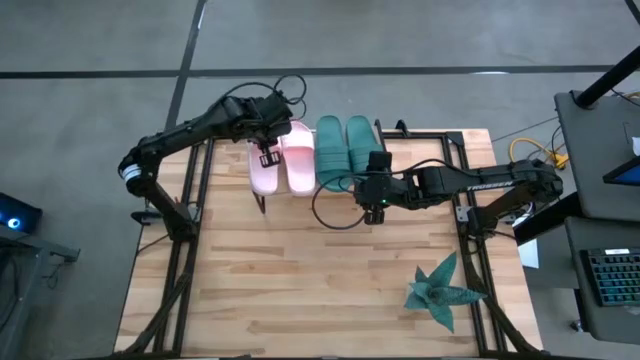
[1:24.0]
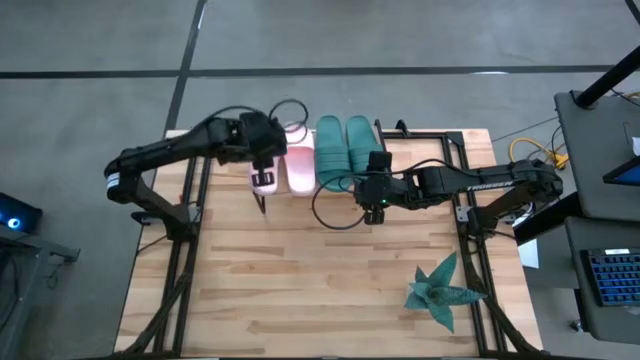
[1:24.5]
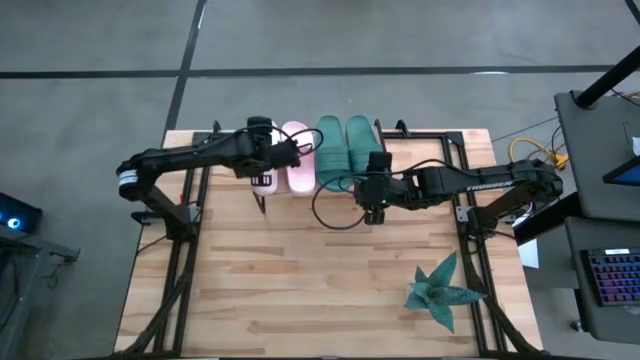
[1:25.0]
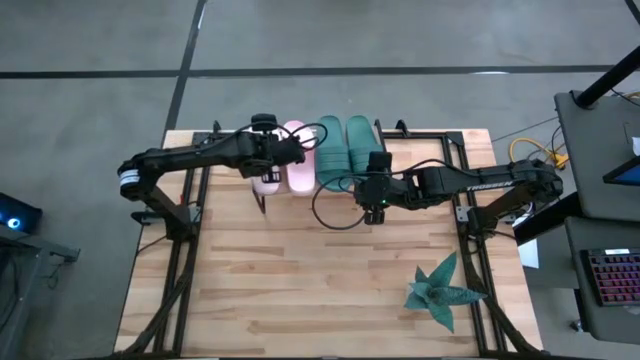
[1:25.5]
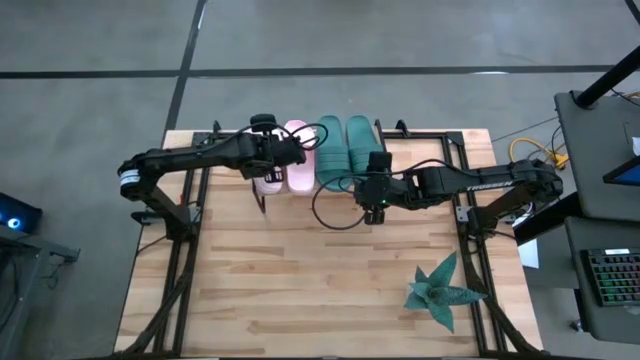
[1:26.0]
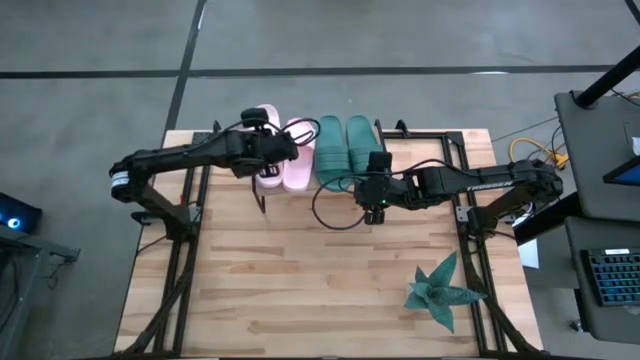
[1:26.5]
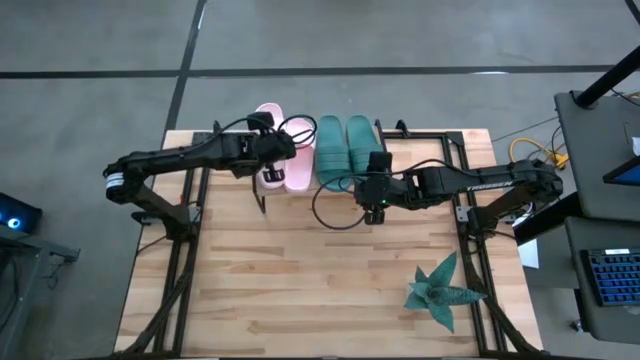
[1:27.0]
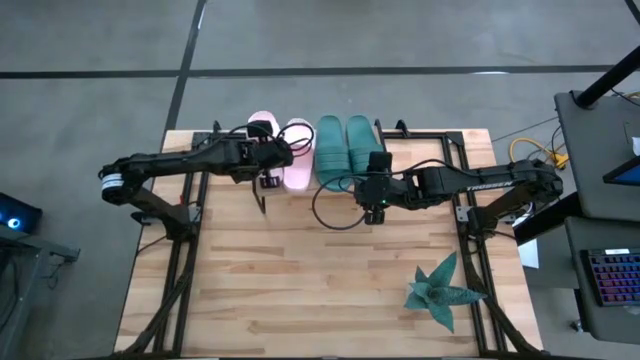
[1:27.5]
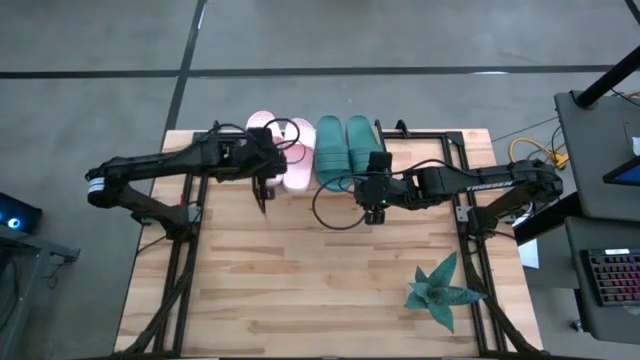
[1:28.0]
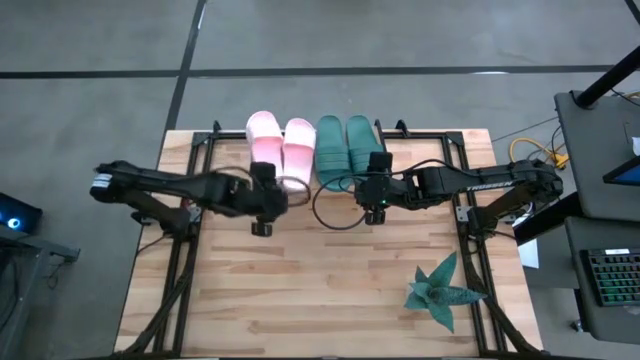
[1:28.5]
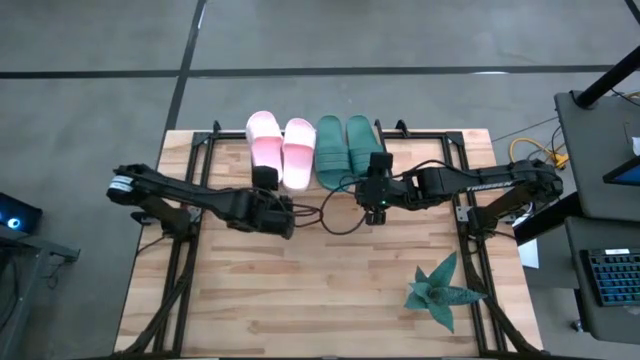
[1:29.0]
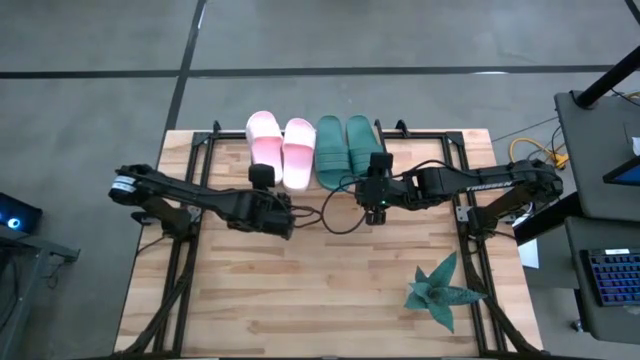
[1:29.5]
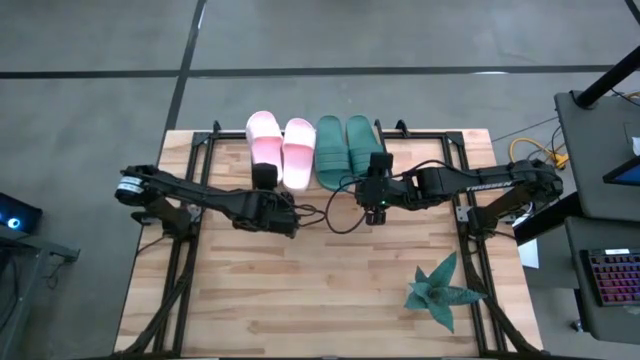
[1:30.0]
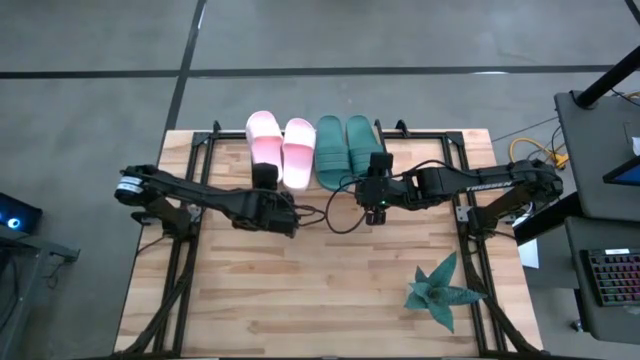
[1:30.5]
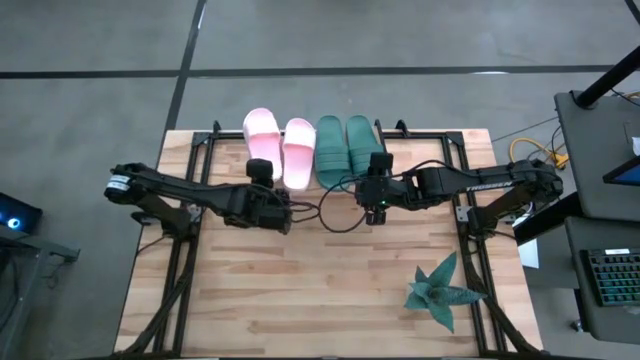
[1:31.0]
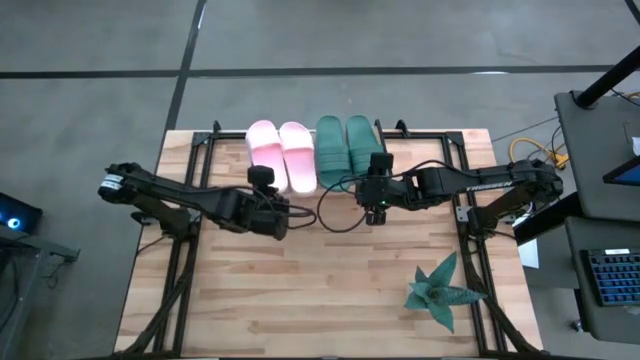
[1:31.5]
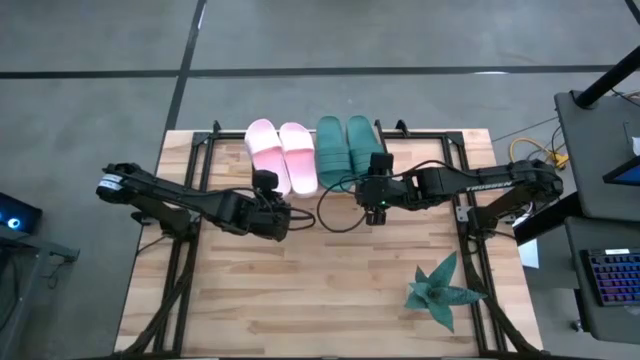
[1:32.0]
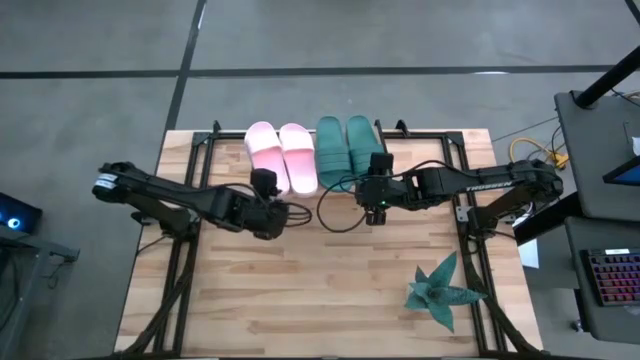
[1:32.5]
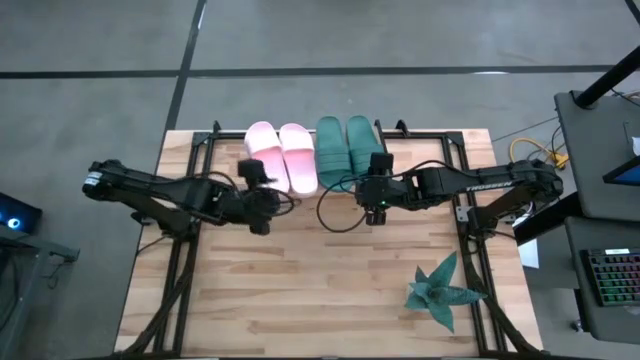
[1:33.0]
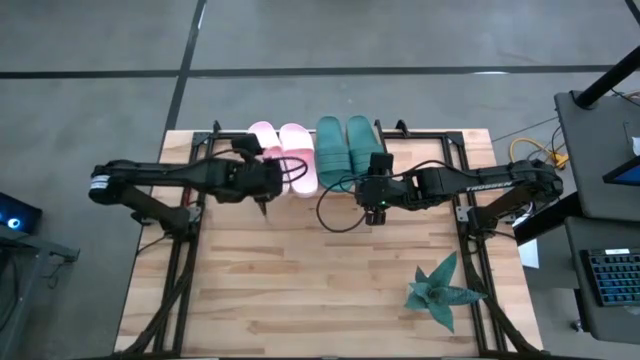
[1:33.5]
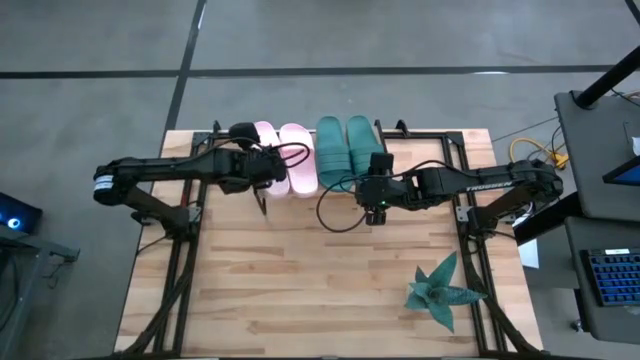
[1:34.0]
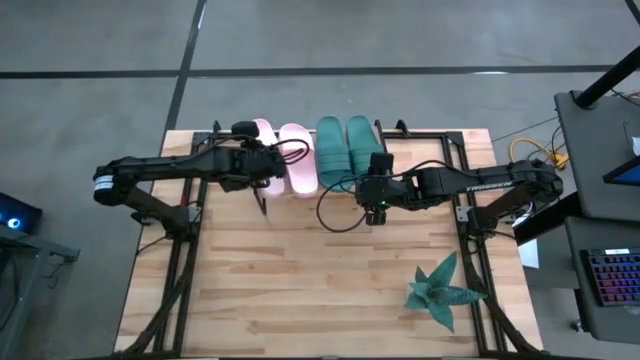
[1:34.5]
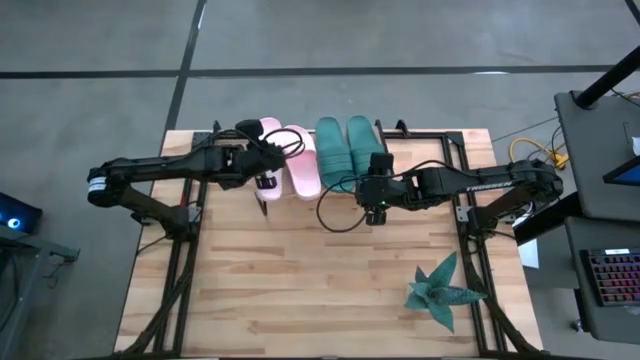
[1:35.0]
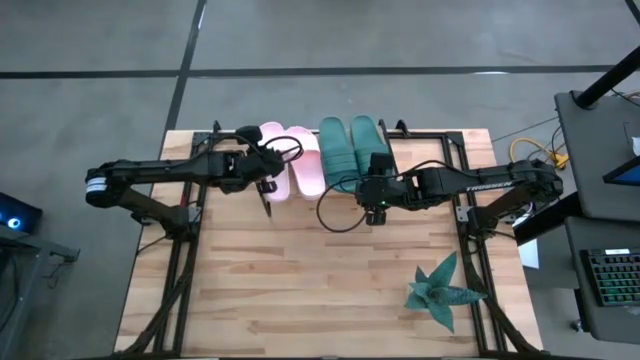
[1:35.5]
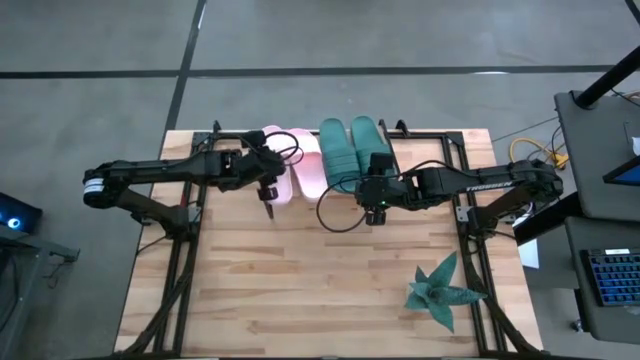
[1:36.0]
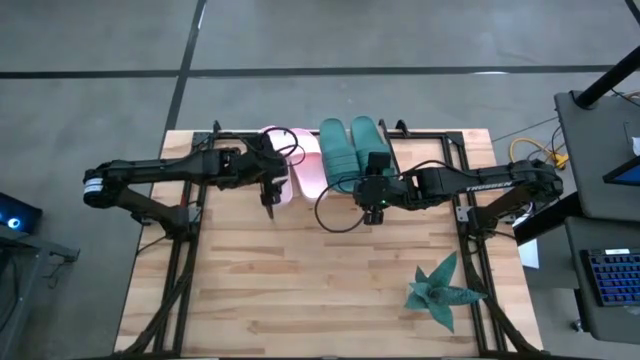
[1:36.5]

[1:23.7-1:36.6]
Task: Pick and place slides into the shelf
Put the pink slipper on the shelf

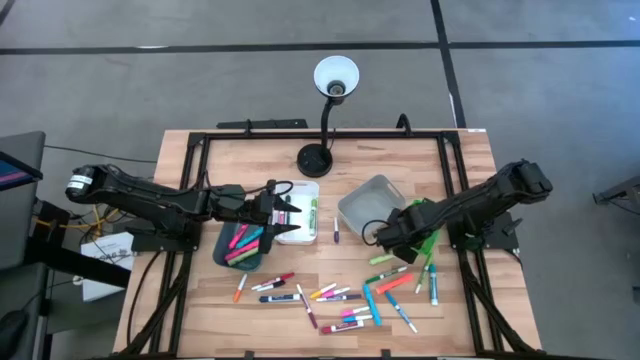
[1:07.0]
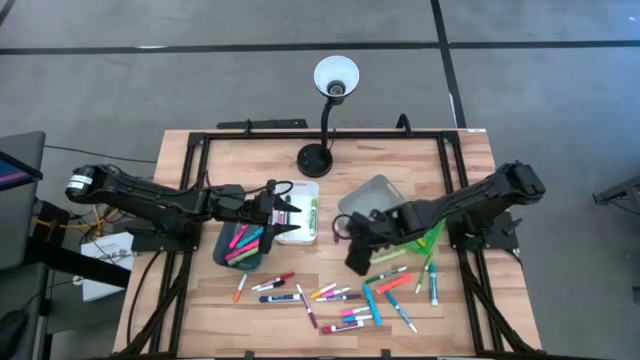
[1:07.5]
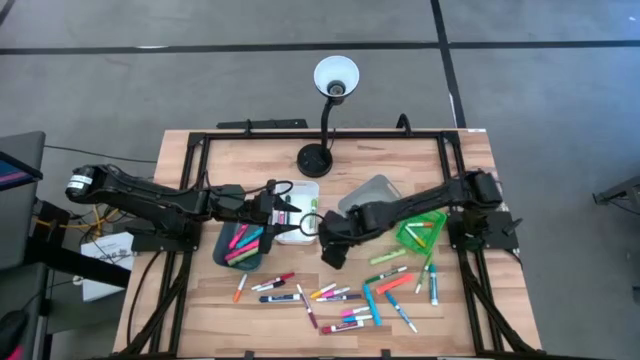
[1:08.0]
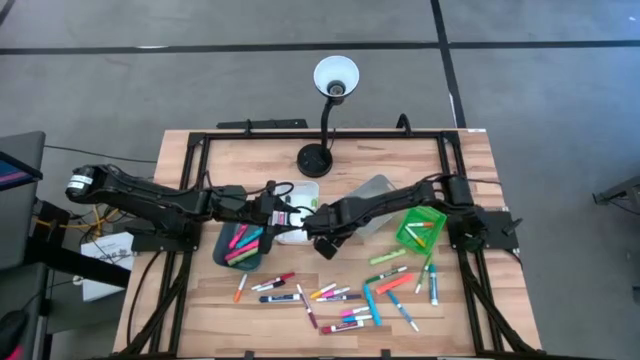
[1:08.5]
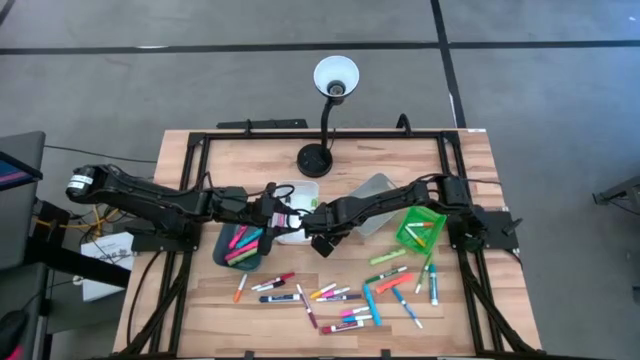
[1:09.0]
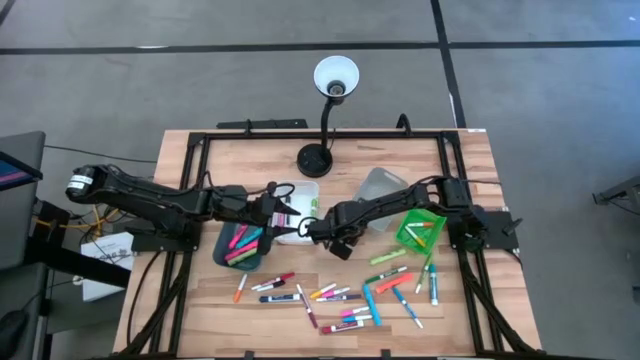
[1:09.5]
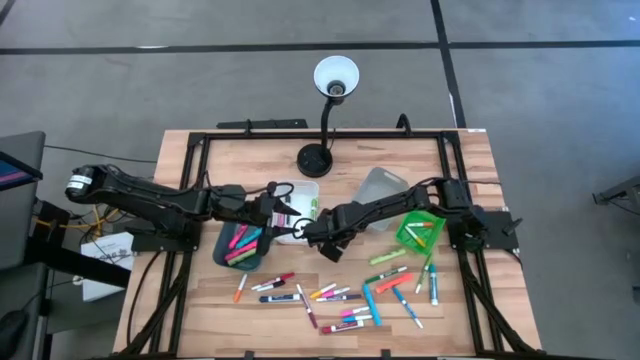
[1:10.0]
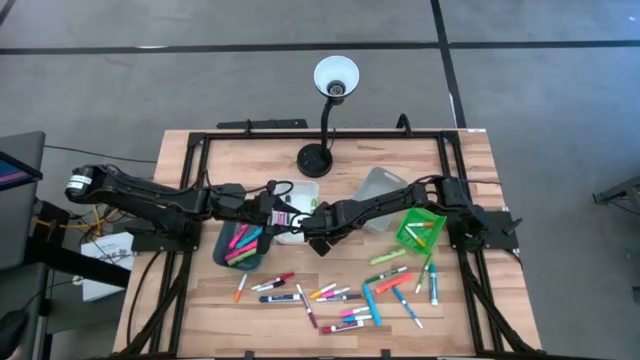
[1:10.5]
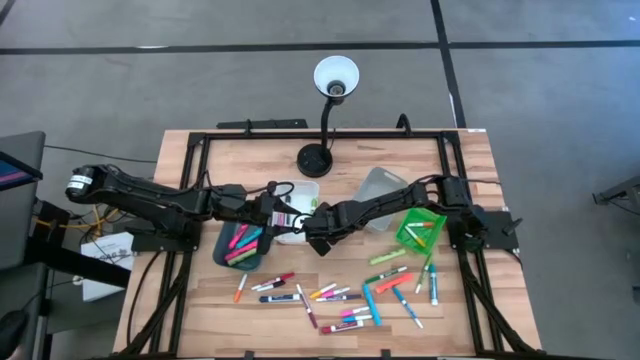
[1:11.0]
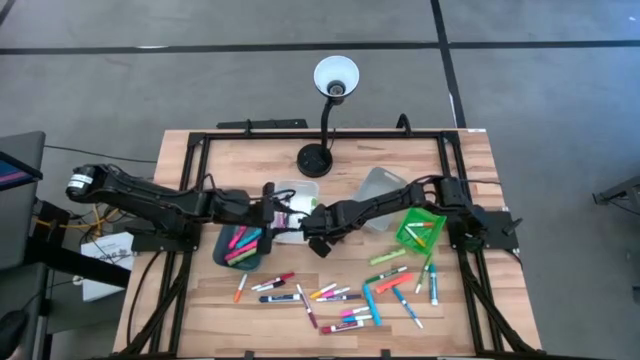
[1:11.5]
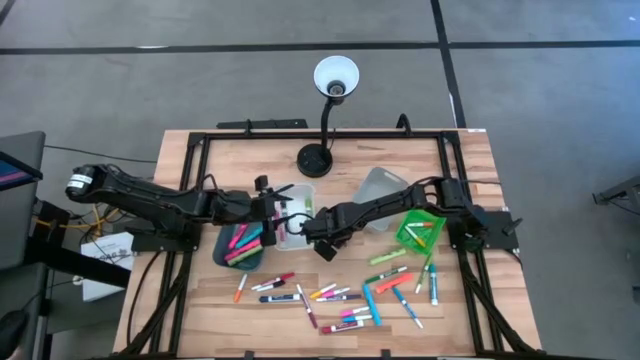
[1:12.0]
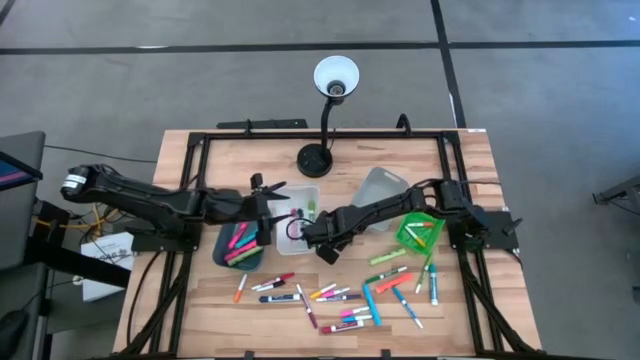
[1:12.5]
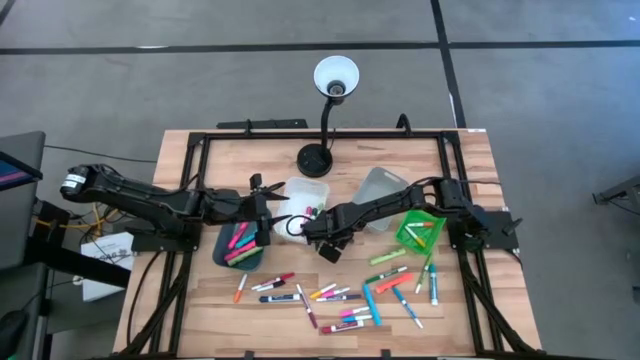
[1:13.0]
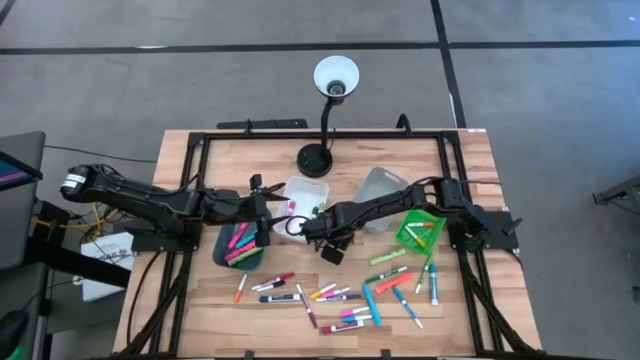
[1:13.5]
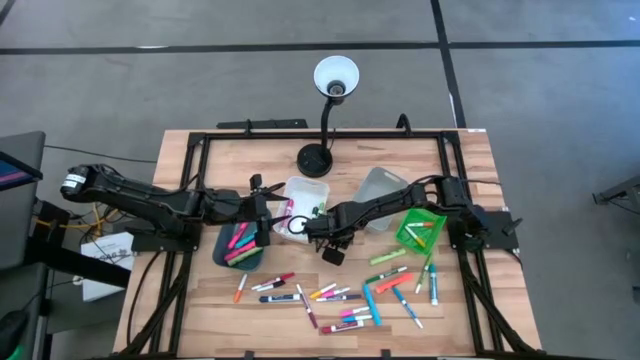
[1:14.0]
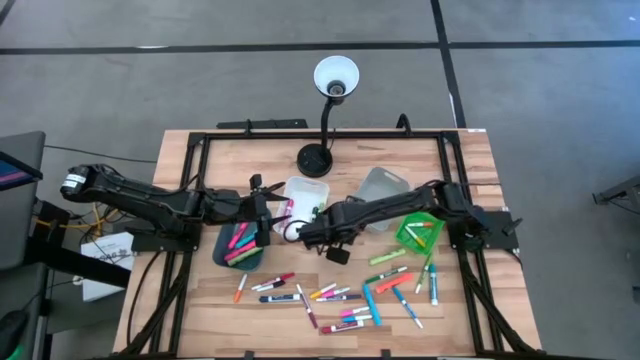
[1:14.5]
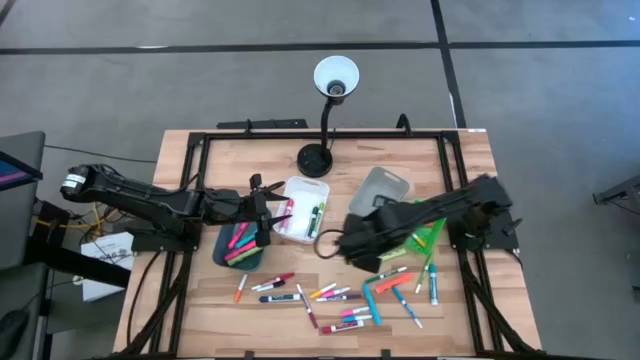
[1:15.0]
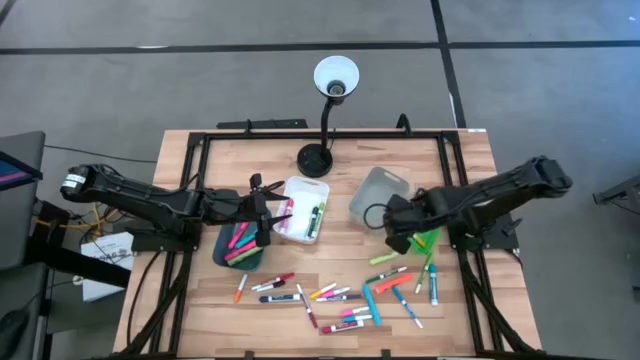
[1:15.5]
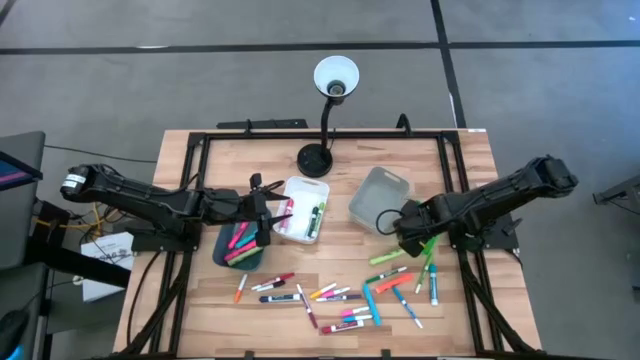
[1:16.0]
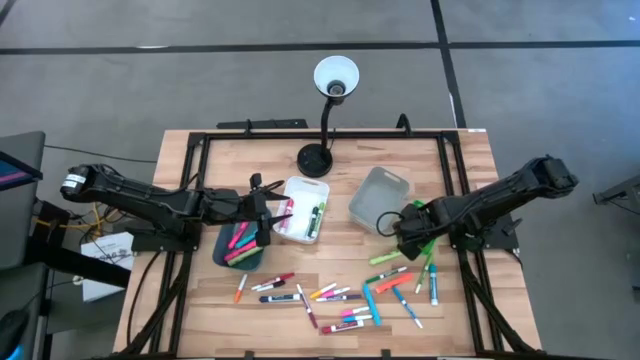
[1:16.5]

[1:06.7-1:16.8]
Task: Pick & Place Markers
Put the violet mini marker into the green bin
